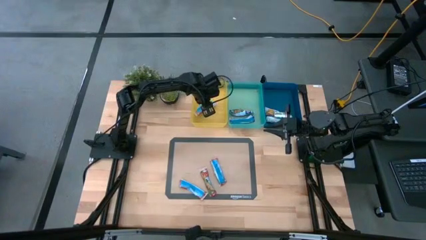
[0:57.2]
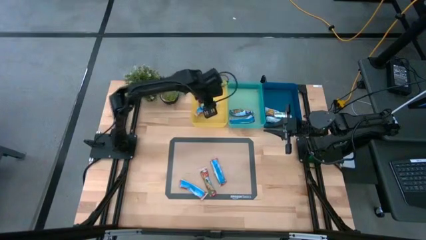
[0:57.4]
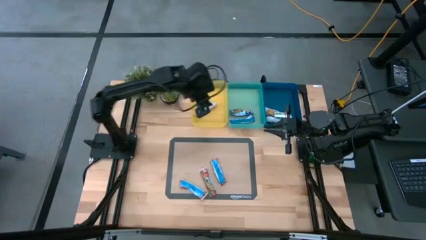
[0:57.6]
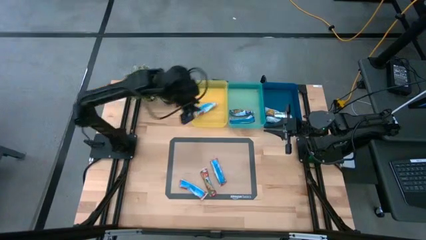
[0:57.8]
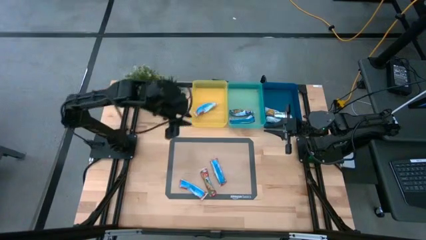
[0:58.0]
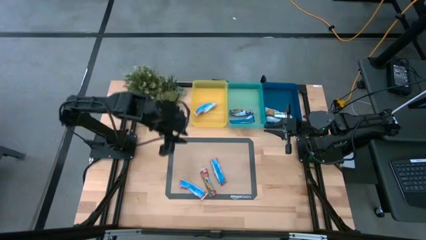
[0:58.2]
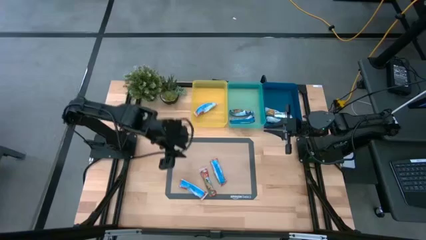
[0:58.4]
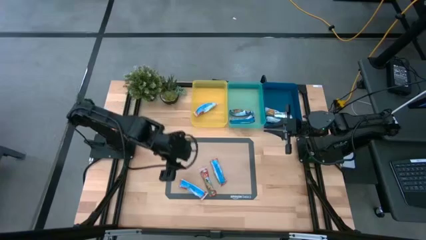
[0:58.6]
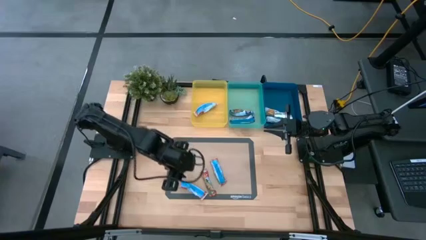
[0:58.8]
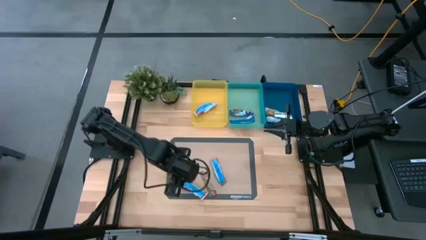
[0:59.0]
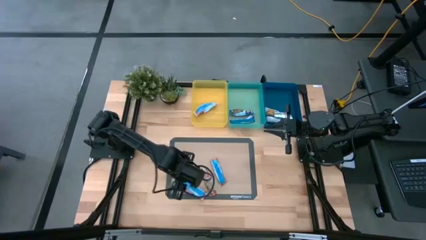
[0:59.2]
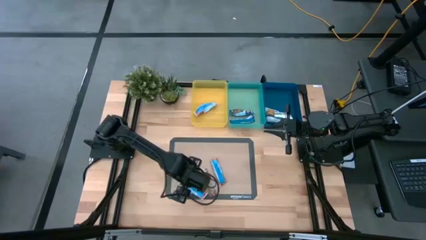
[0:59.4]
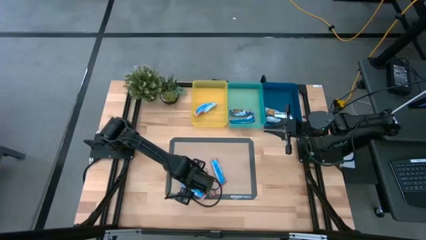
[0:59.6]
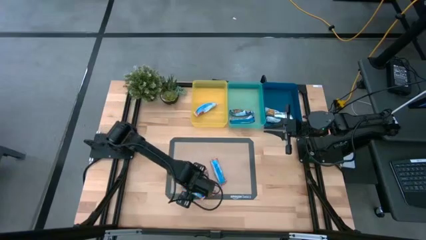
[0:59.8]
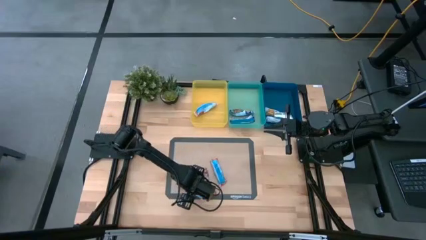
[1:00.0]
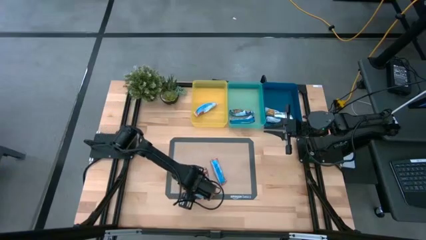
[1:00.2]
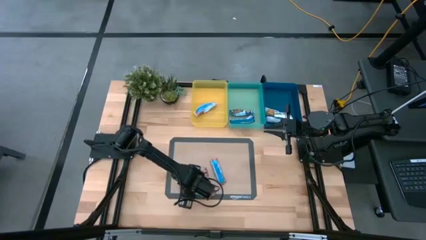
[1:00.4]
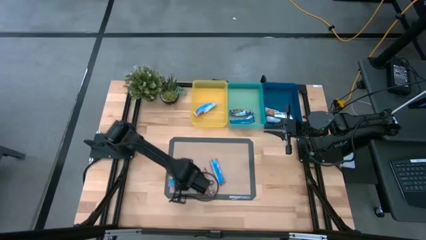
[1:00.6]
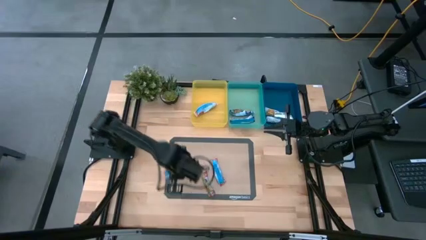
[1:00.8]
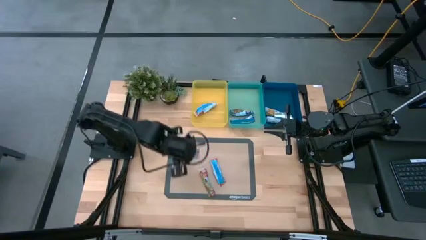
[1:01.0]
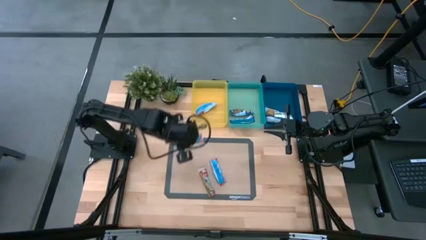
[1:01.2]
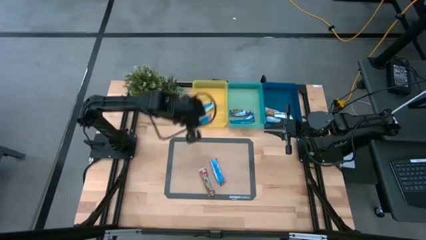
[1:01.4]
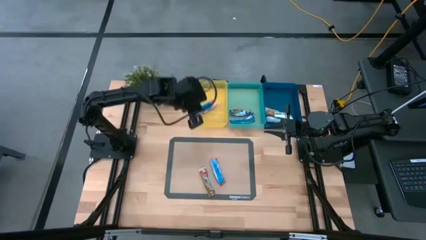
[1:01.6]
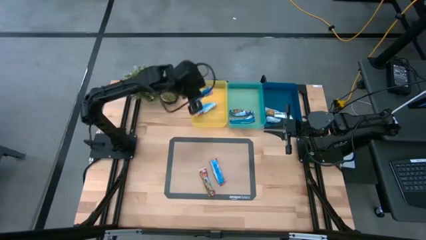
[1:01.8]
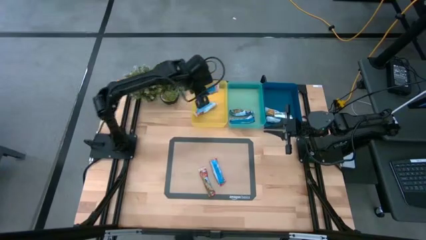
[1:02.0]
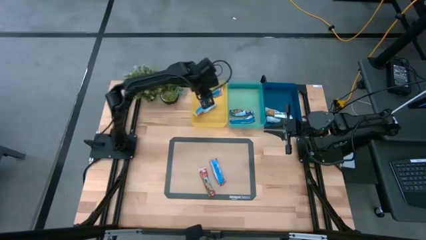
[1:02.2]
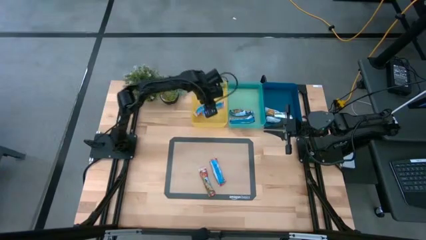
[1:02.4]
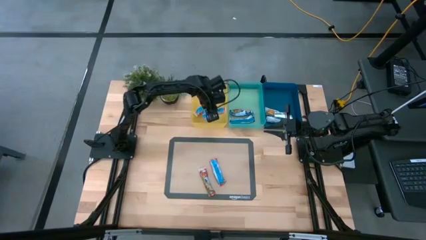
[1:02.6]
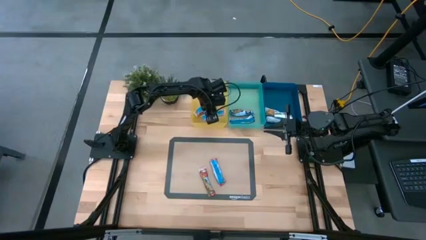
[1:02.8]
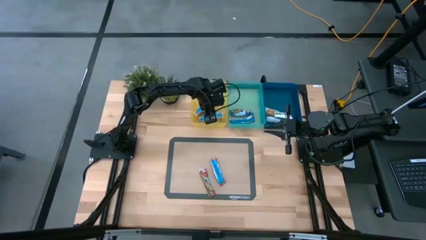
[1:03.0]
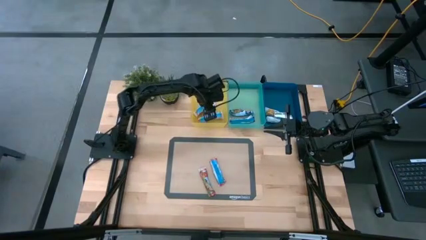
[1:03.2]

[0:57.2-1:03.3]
Task: Pick and place Granola Bars by type
Put the red granola bar into the yellow bin

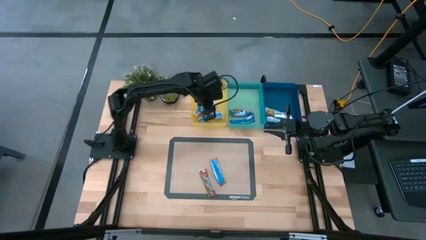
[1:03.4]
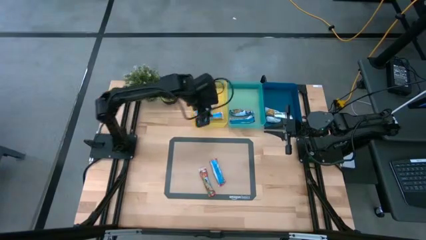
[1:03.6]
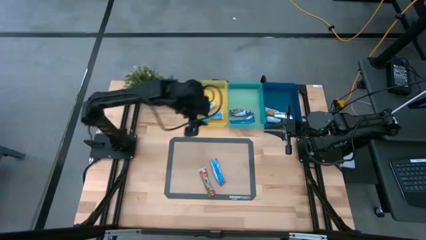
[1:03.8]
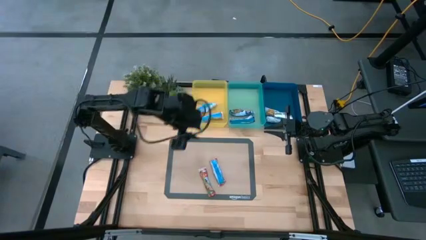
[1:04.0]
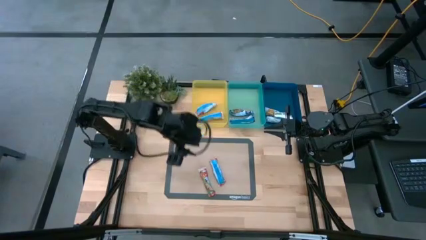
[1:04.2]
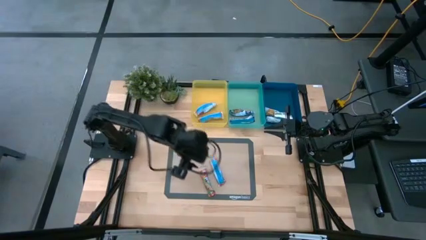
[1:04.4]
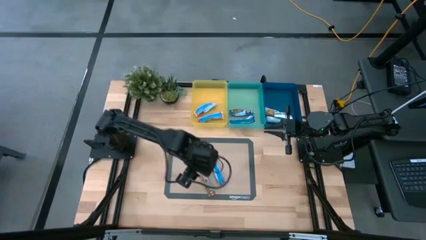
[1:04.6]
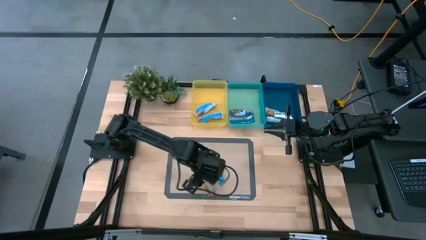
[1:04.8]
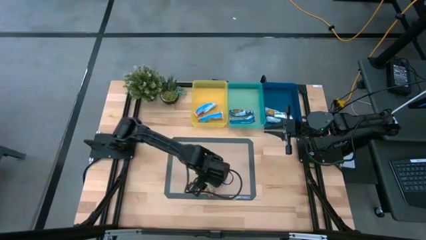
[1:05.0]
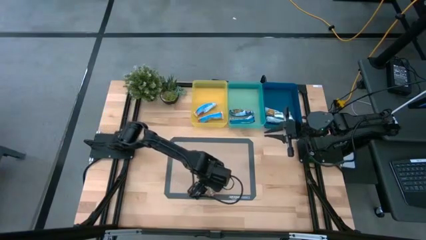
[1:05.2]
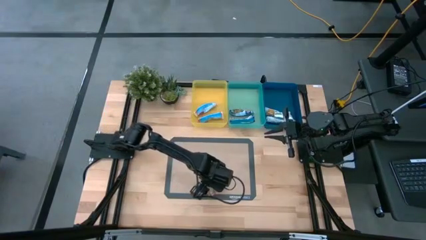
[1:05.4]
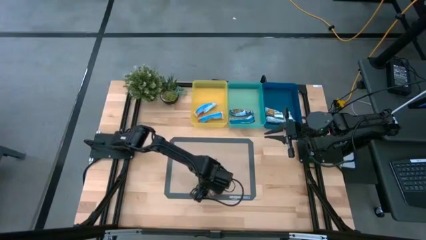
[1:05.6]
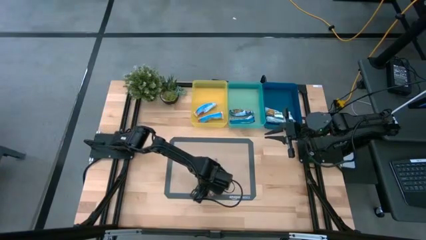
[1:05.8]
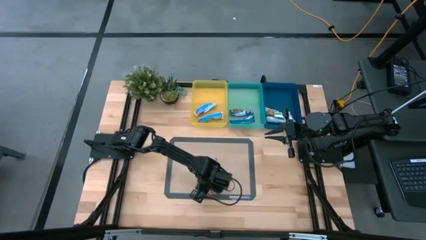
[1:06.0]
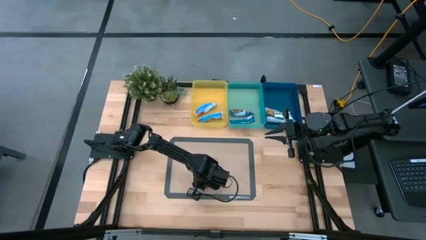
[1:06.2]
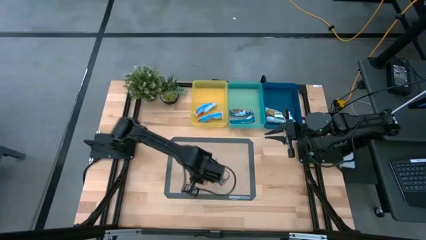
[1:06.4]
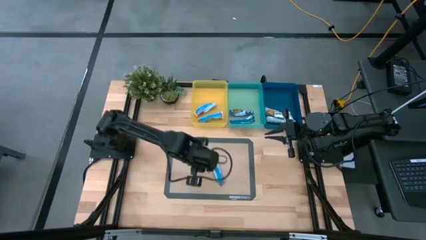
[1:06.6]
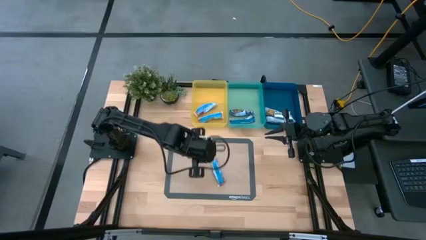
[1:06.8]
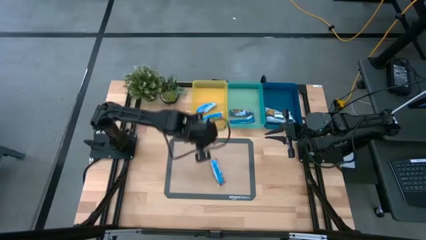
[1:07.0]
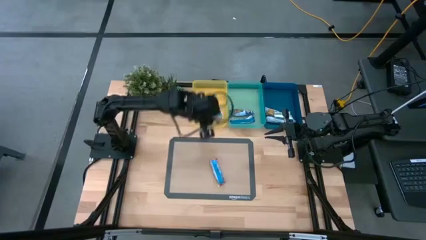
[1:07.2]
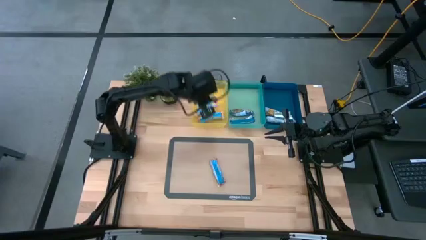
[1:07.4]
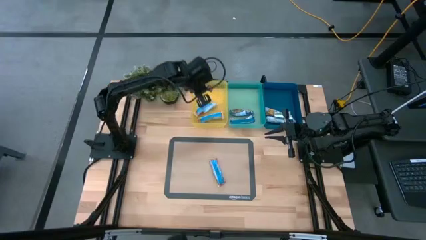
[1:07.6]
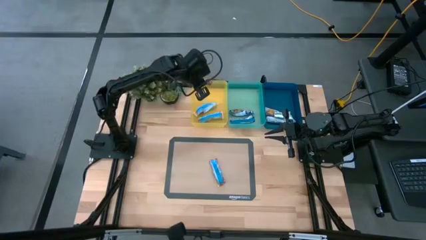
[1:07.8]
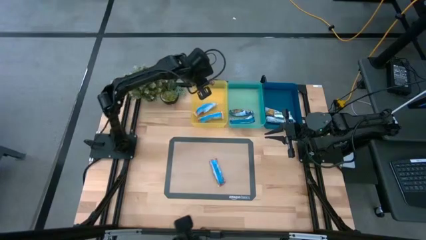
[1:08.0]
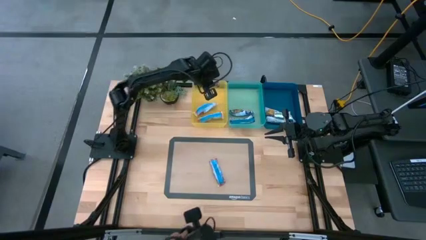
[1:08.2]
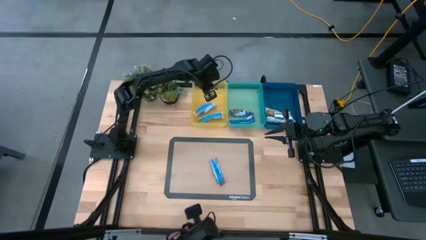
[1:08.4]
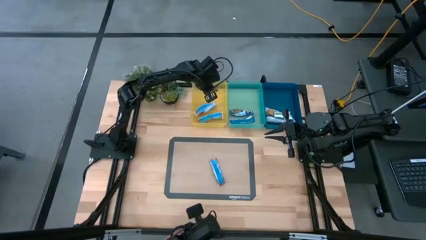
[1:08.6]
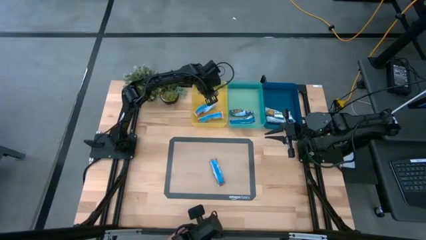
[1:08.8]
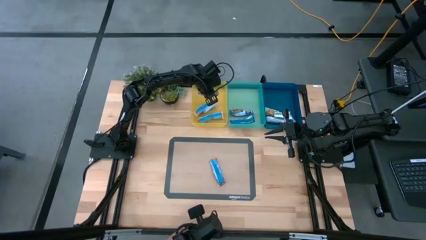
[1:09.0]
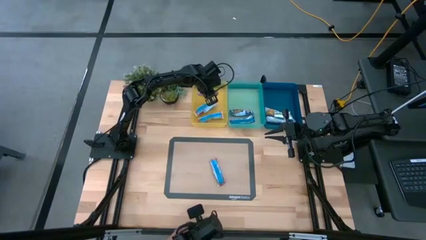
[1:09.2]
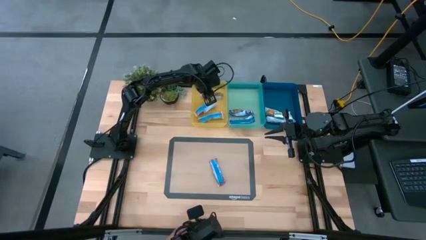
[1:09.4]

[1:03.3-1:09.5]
Put the red granola bar into the yellow bin

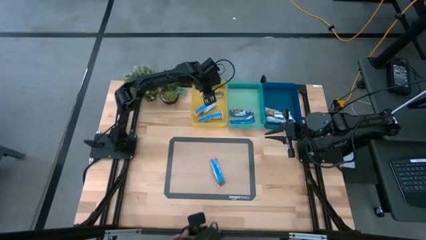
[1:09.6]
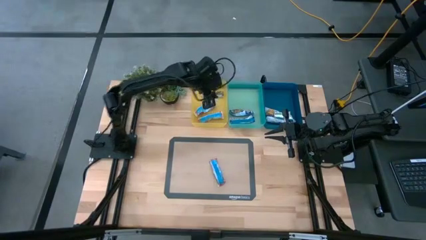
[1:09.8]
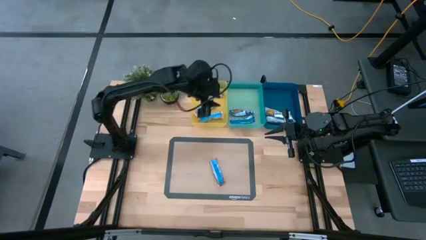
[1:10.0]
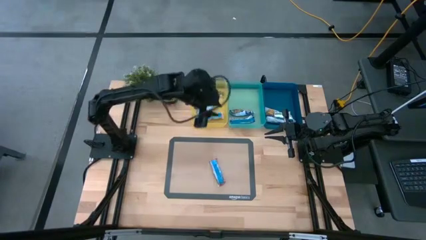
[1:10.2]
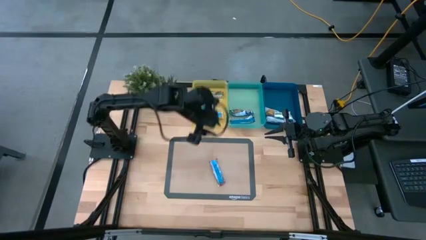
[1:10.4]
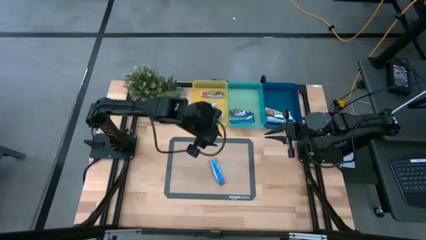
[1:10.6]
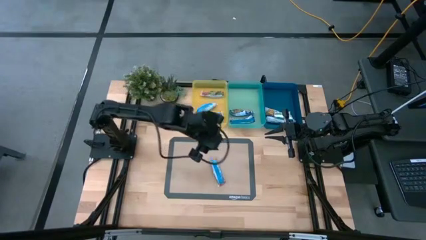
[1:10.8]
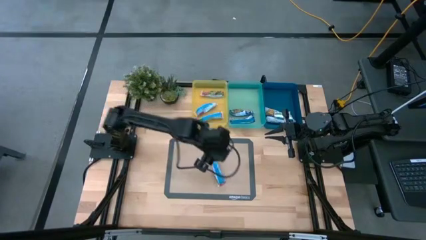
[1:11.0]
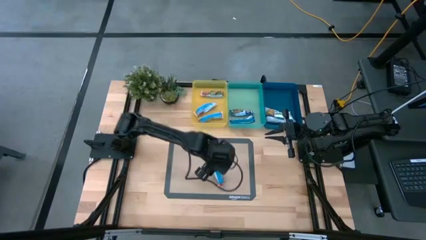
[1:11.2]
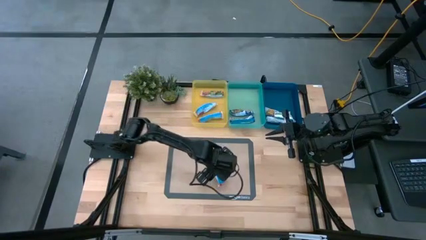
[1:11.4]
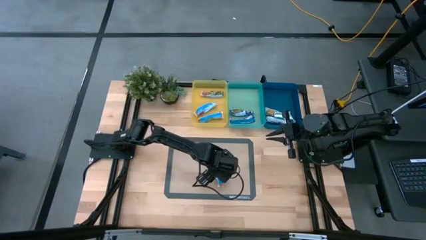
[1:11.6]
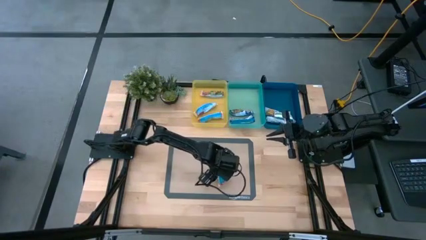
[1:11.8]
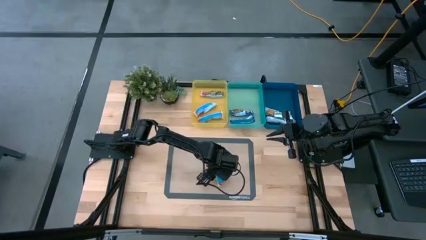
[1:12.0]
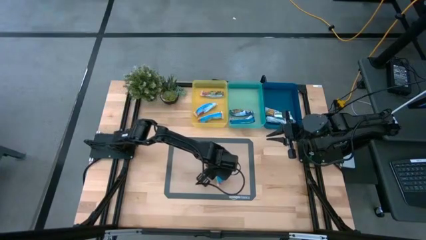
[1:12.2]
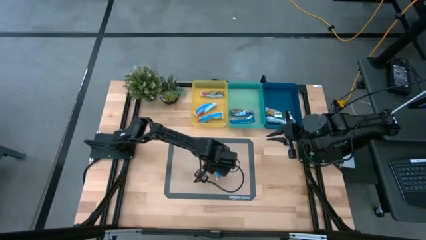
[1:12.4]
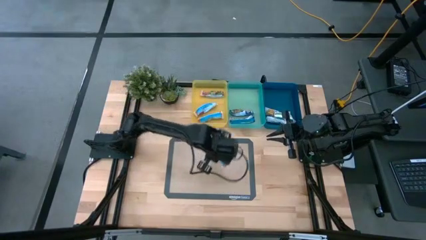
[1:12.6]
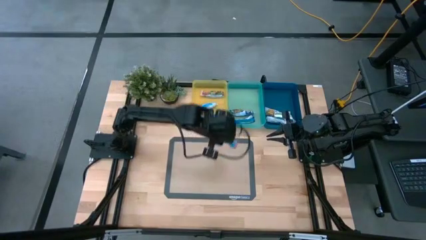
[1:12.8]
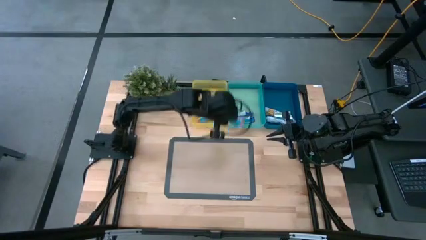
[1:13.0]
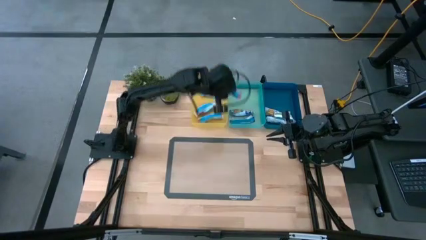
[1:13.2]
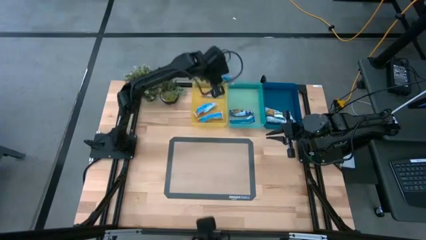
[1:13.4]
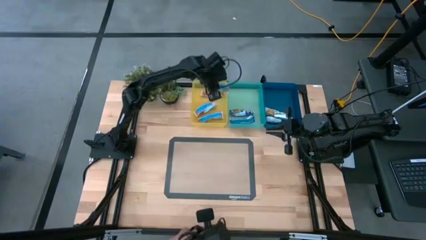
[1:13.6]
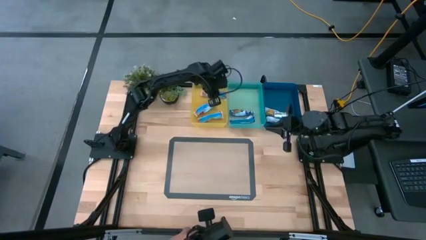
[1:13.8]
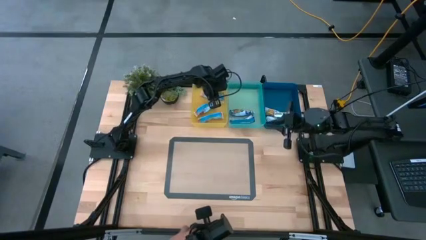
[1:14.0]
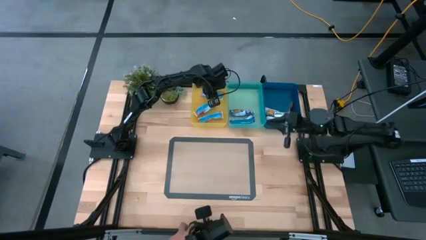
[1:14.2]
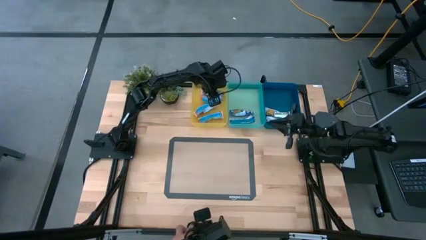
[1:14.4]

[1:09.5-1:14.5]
Put the red granola bar into the yellow bin
